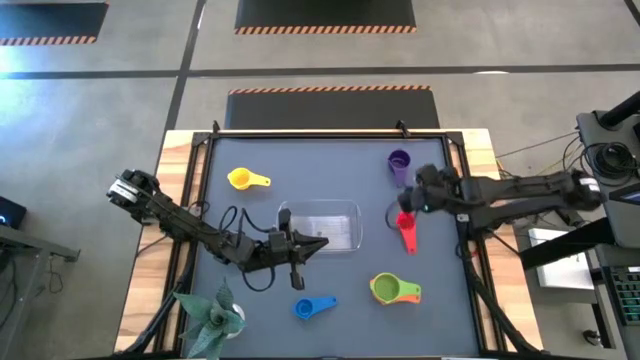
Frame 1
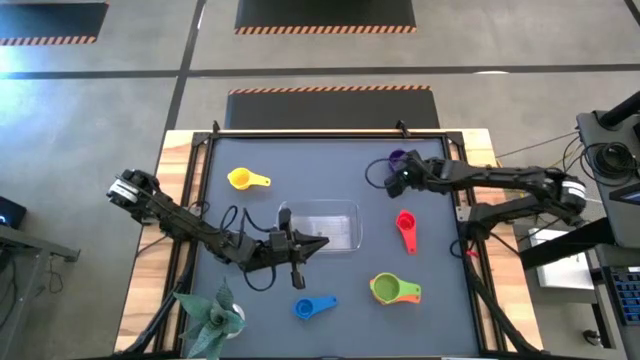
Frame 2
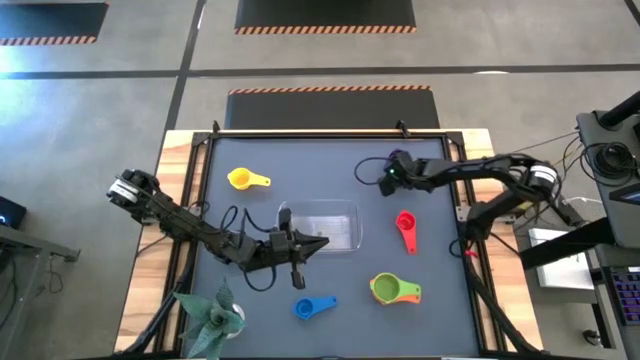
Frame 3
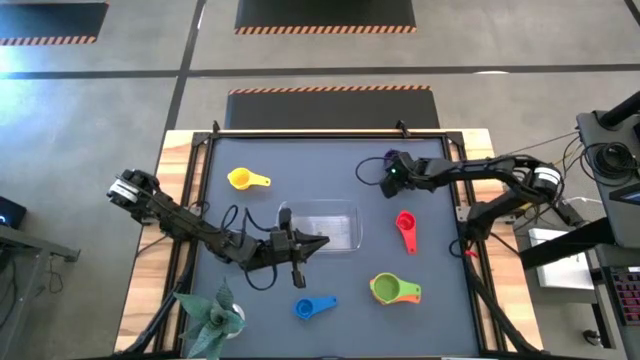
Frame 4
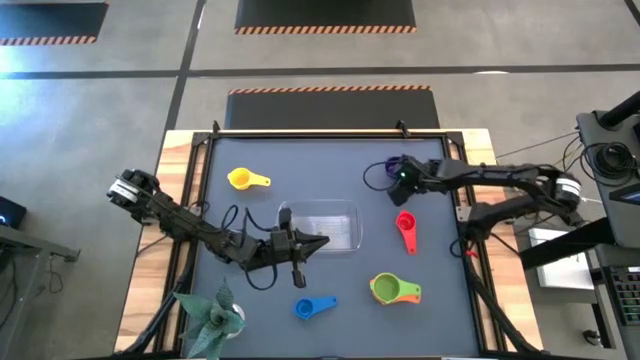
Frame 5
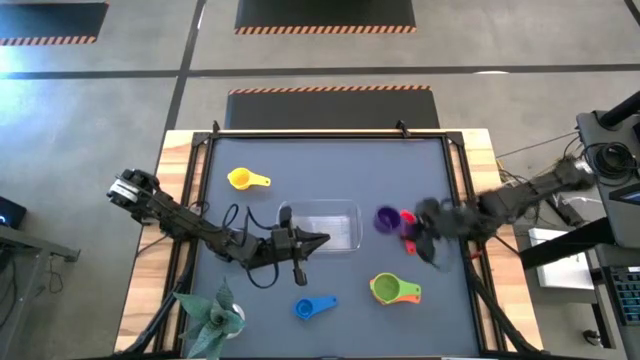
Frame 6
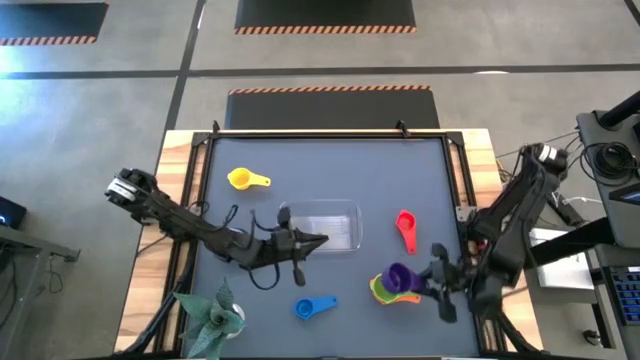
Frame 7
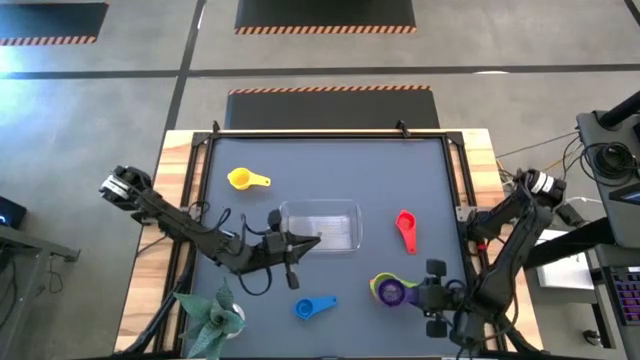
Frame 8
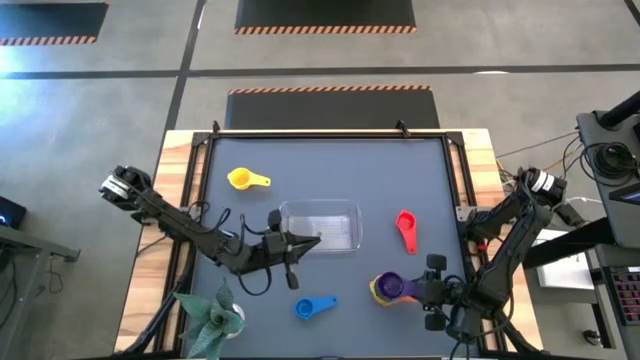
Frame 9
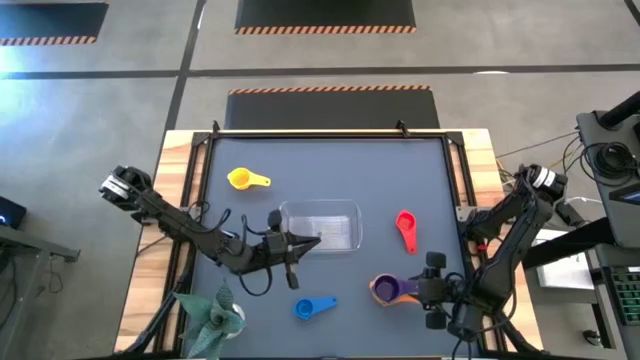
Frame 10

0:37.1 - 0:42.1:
Task: Nest measuring cups in basket
Stack the purple measuring cup on top of the green measuring cup

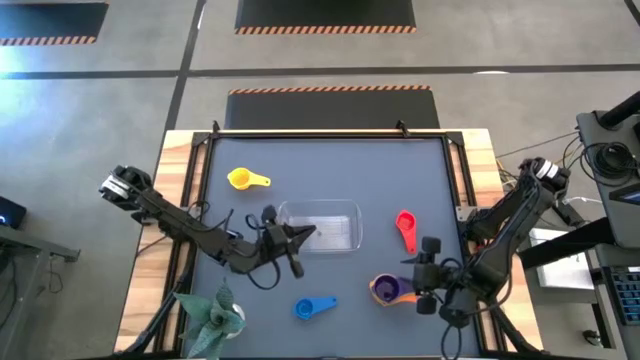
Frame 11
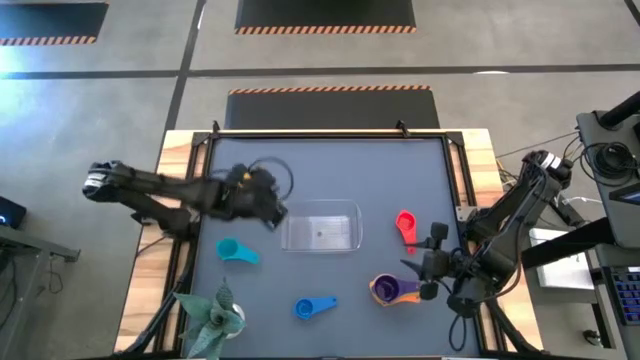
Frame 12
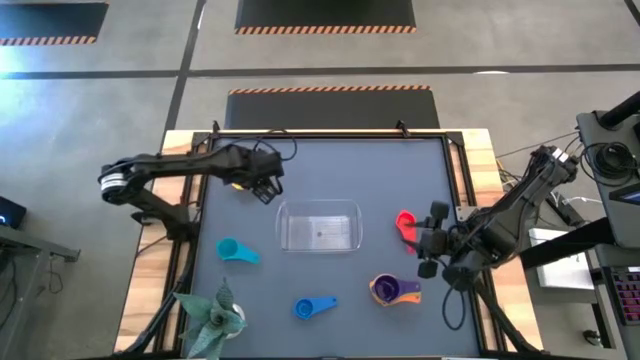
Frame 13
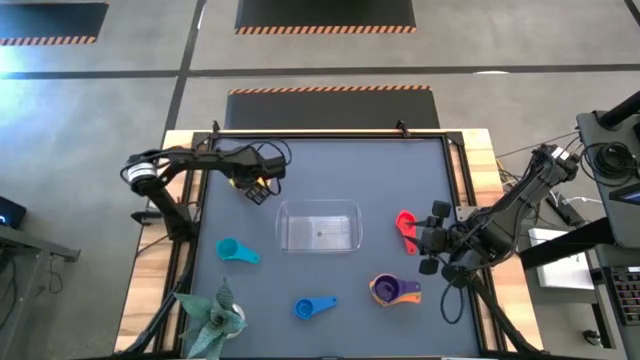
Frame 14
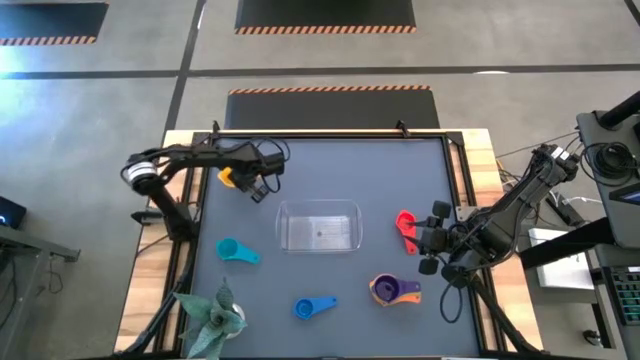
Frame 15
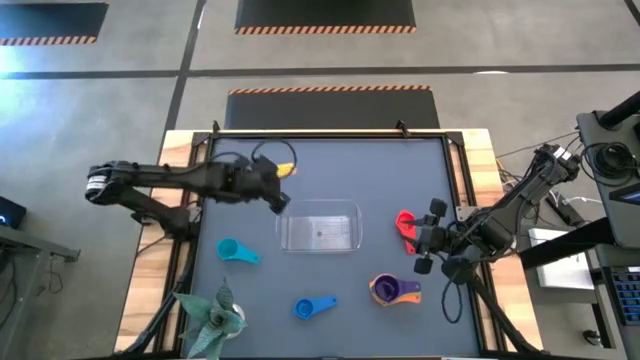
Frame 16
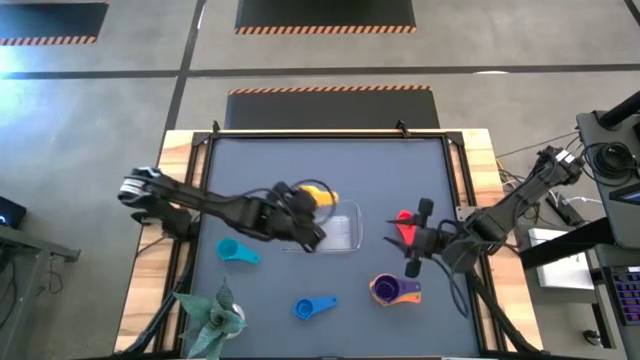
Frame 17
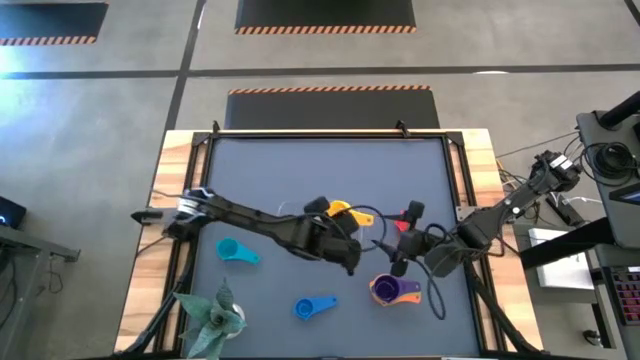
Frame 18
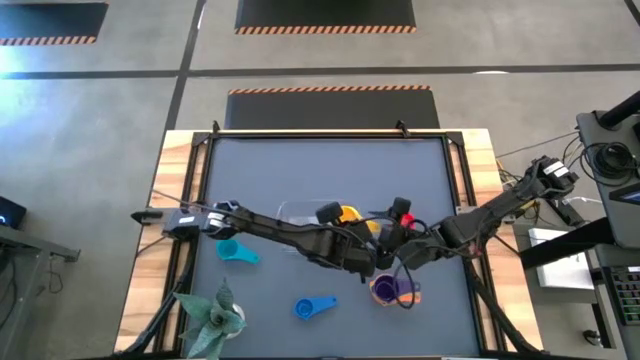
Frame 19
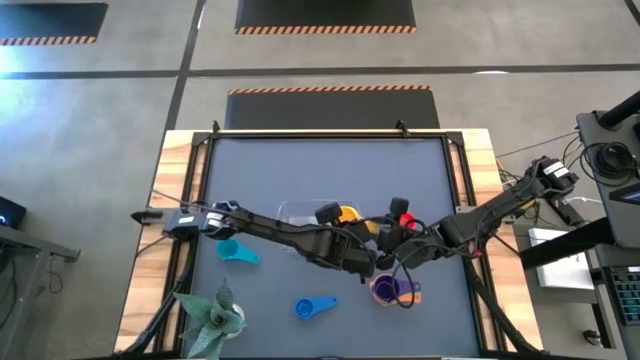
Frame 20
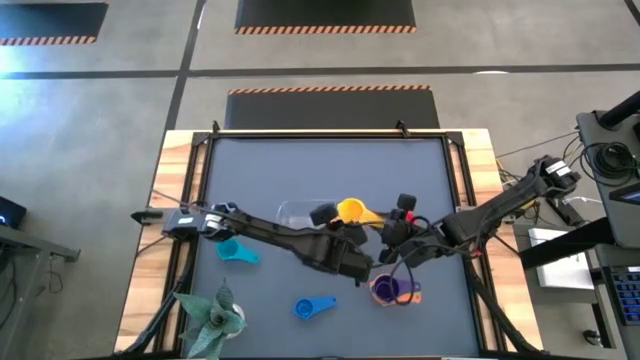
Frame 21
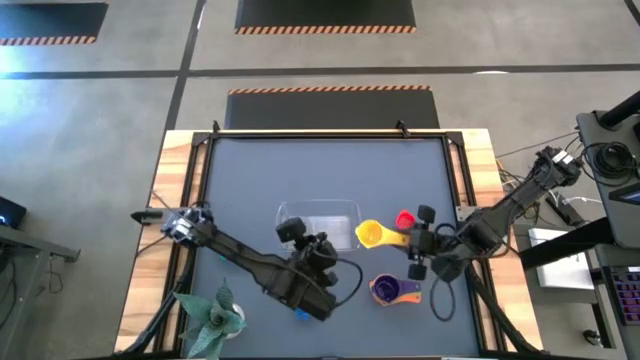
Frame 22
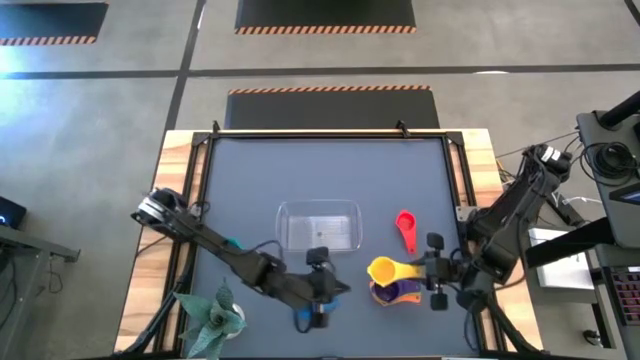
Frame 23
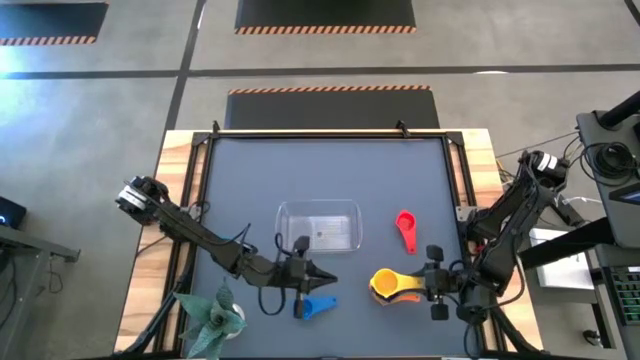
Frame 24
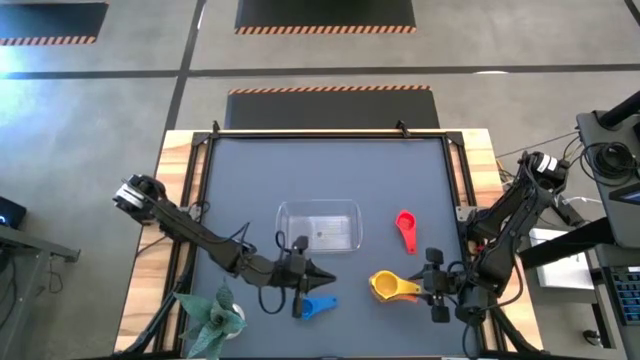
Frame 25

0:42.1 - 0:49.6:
Stack the yellow measuring cup on top of the purple measuring cup

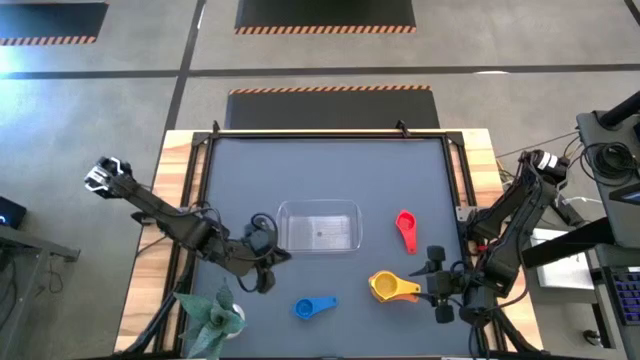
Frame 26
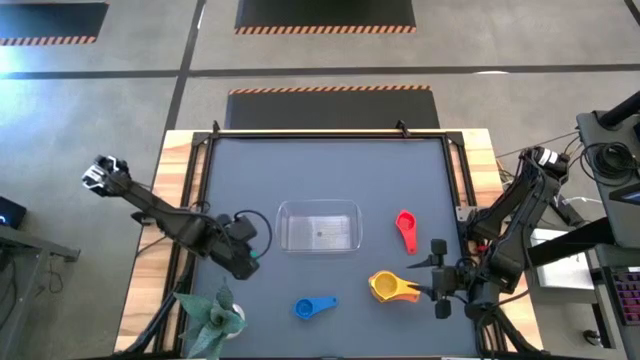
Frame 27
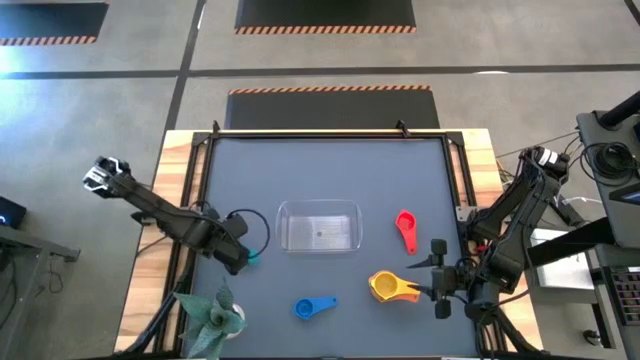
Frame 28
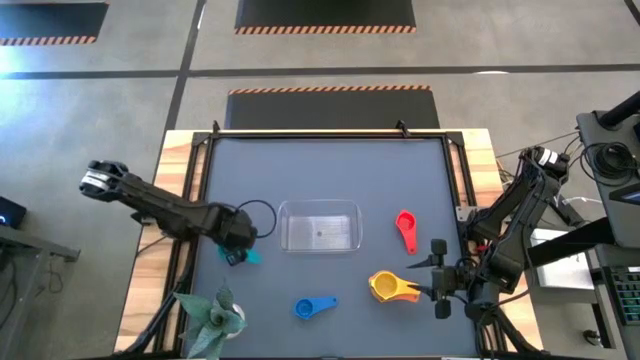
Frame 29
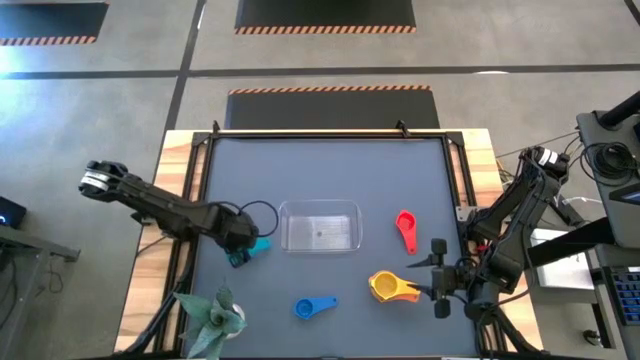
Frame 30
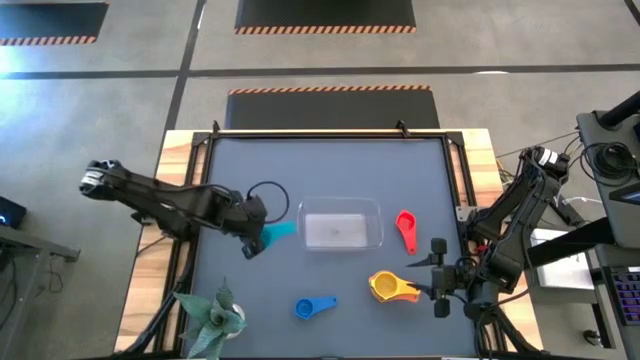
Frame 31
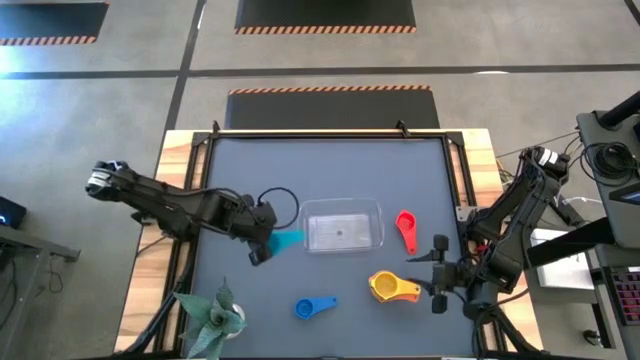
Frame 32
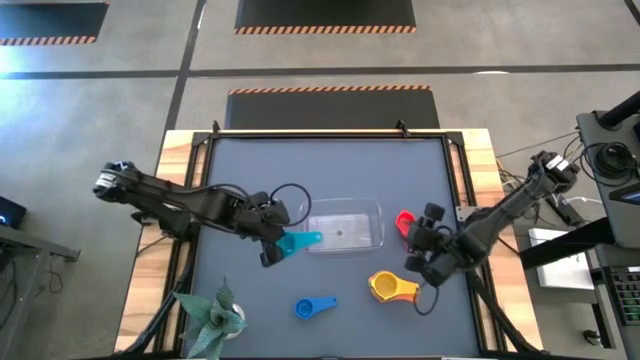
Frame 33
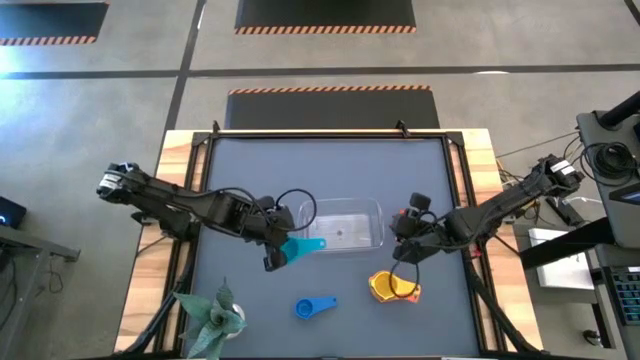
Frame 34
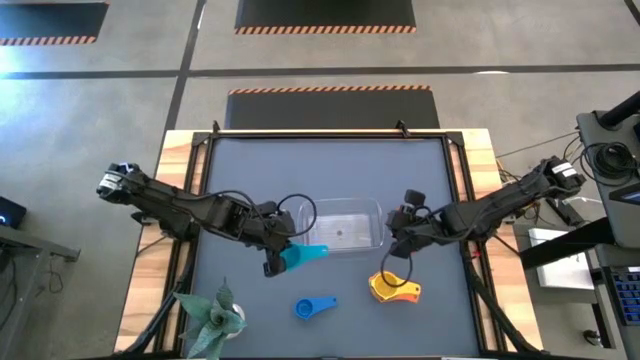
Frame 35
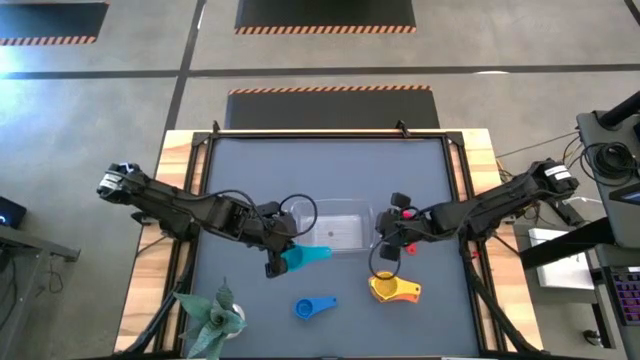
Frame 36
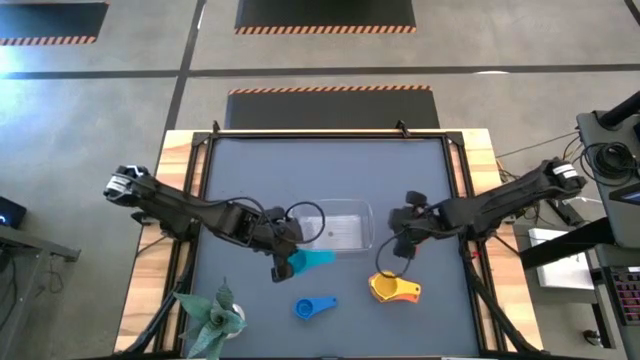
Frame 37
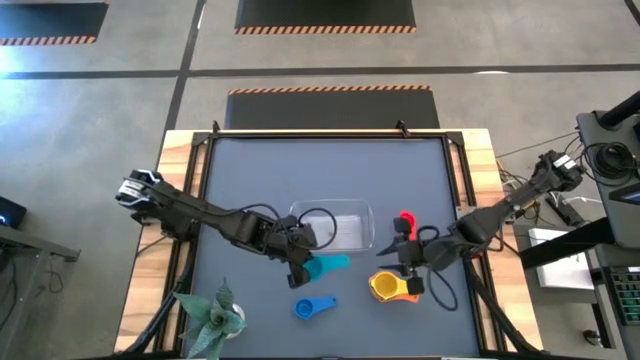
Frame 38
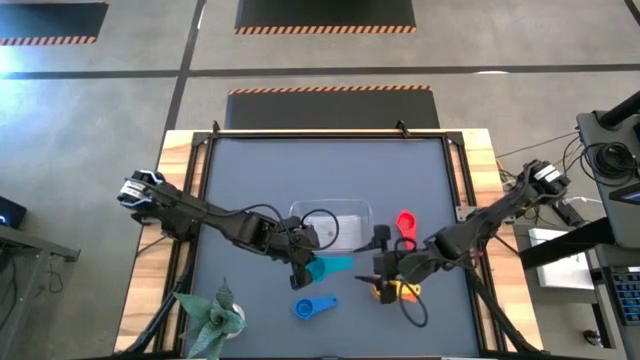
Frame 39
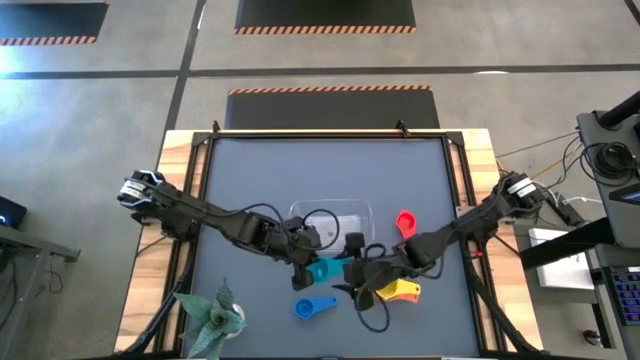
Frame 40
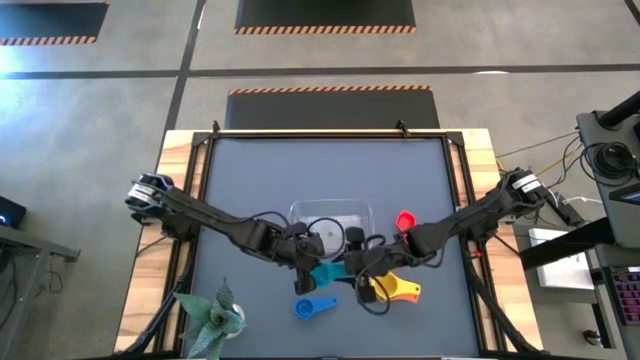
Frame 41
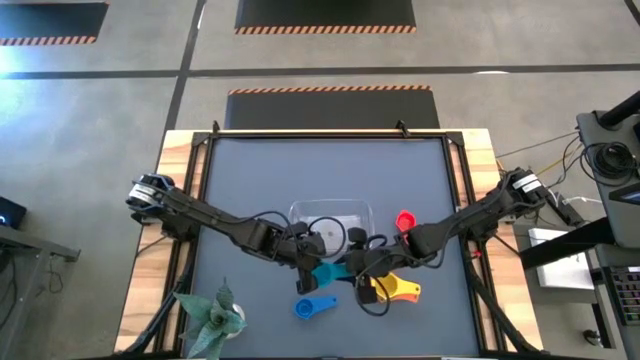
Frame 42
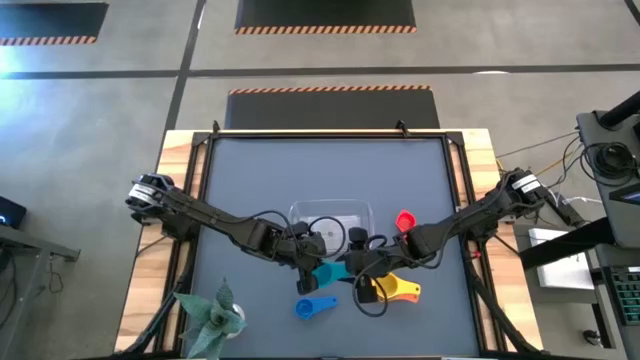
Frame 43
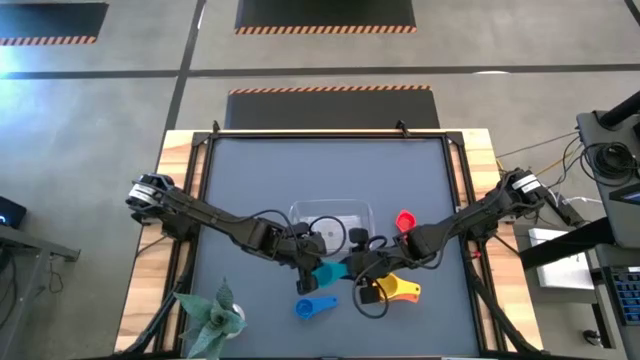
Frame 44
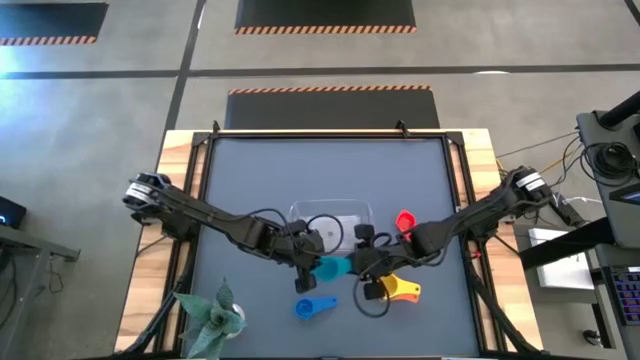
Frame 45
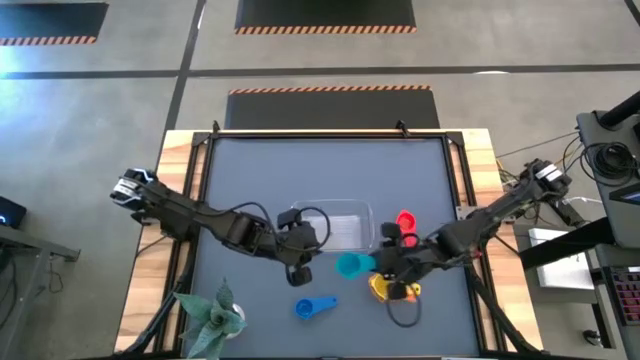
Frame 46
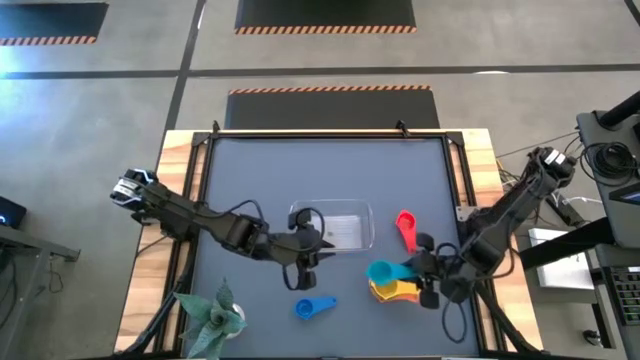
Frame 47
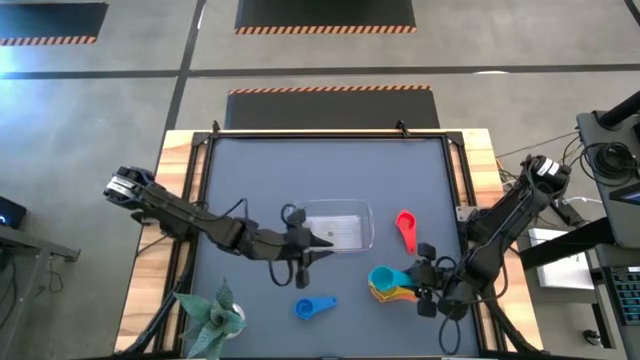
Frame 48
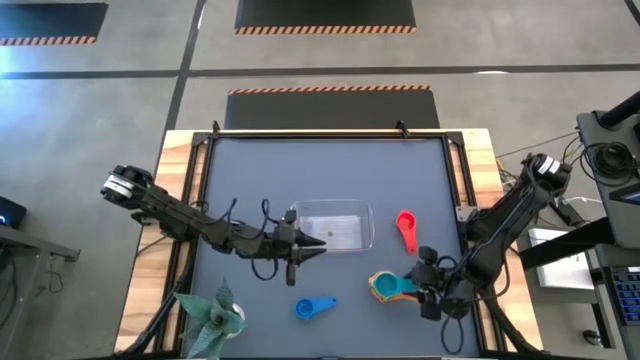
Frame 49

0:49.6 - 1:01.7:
Stack the light blue measuring cup on top of the yellow measuring cup
